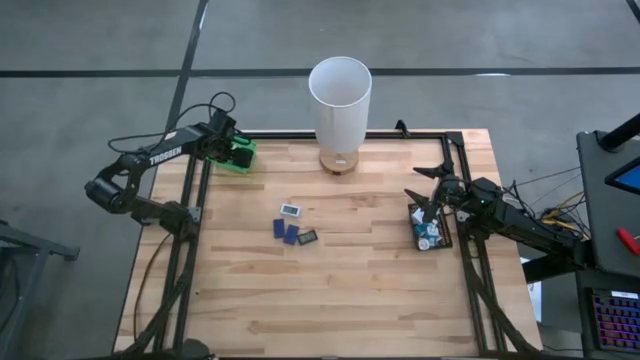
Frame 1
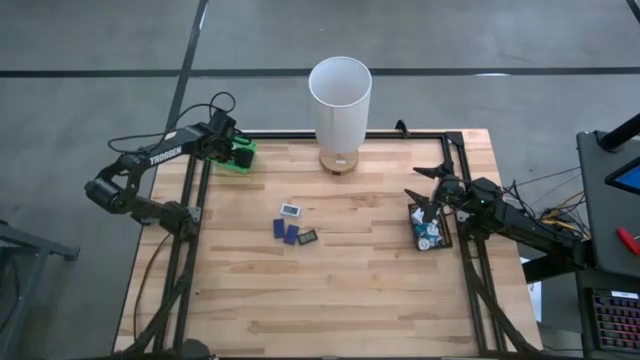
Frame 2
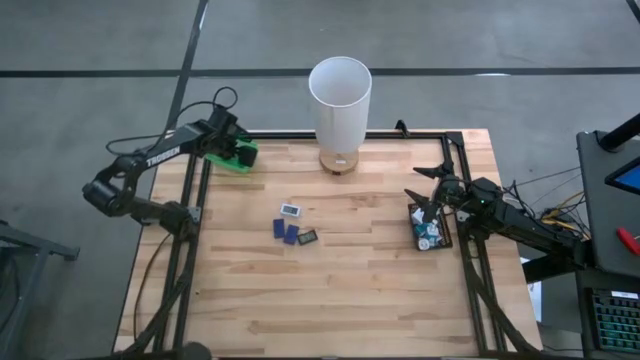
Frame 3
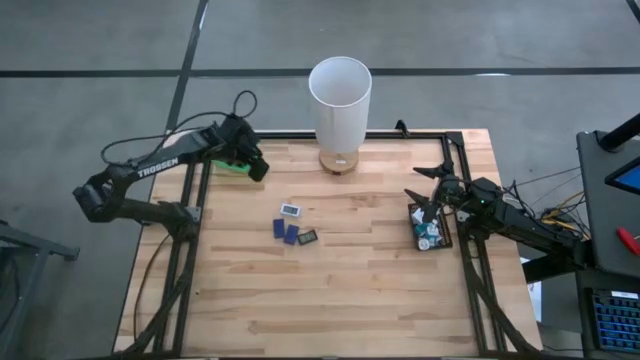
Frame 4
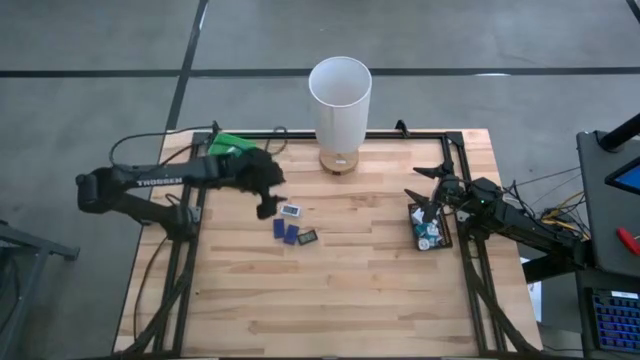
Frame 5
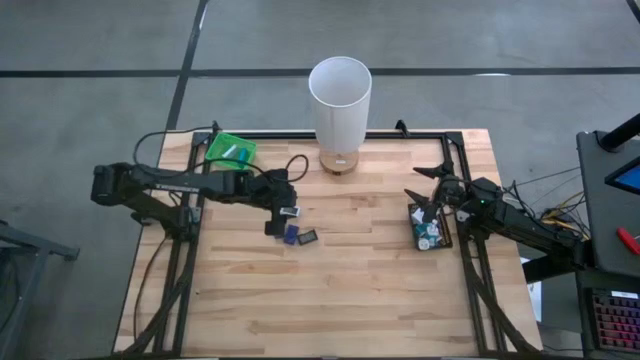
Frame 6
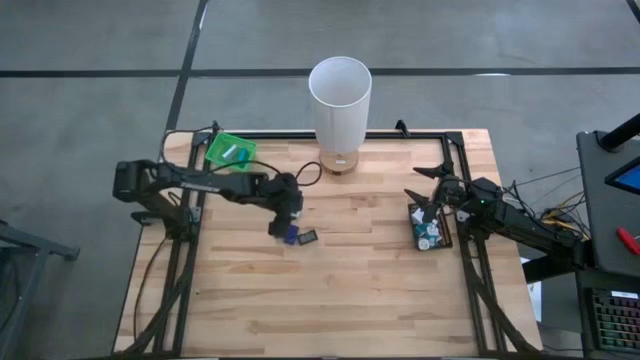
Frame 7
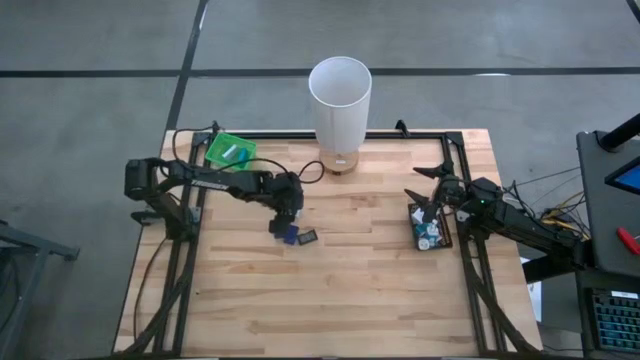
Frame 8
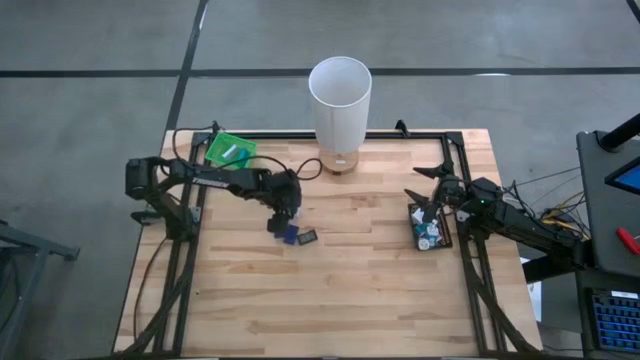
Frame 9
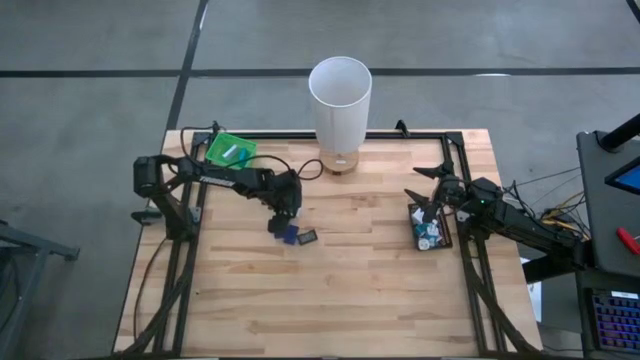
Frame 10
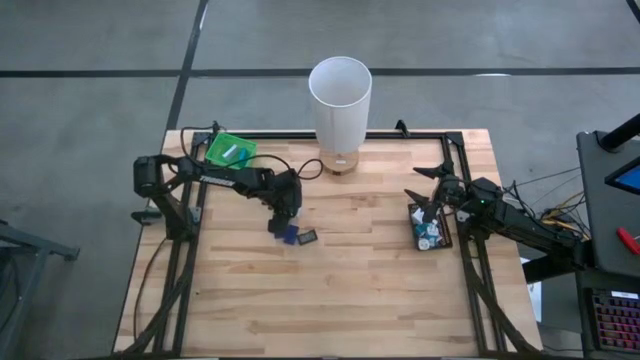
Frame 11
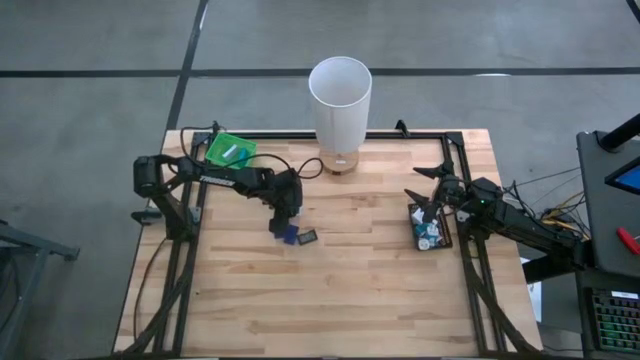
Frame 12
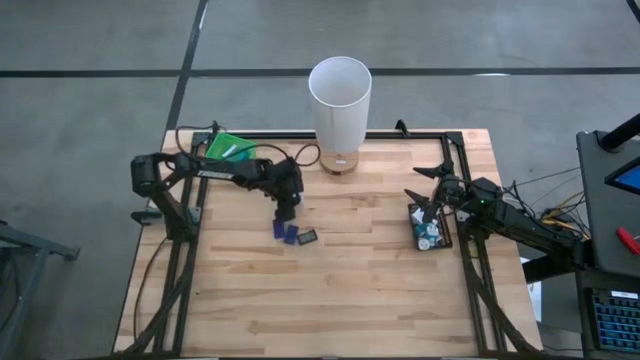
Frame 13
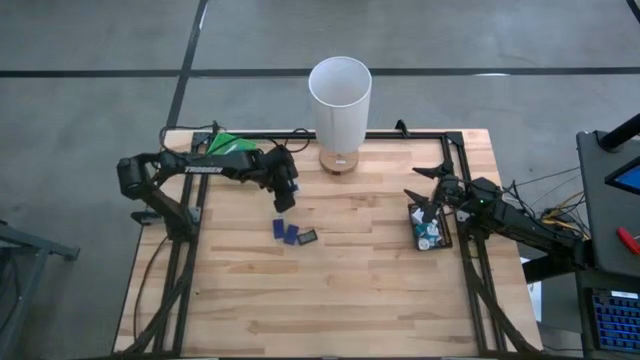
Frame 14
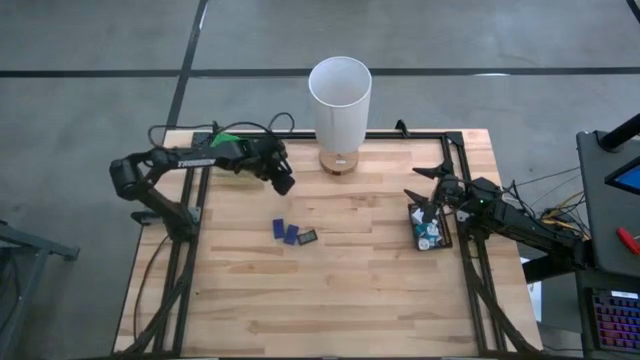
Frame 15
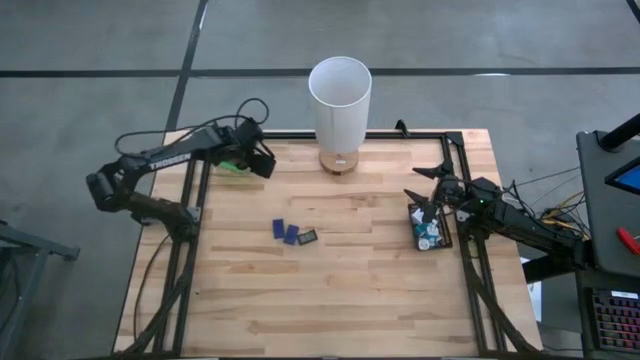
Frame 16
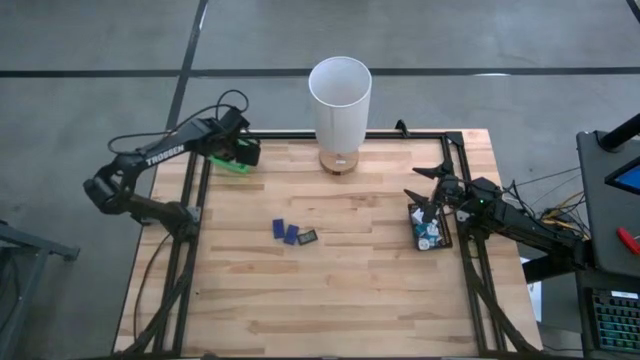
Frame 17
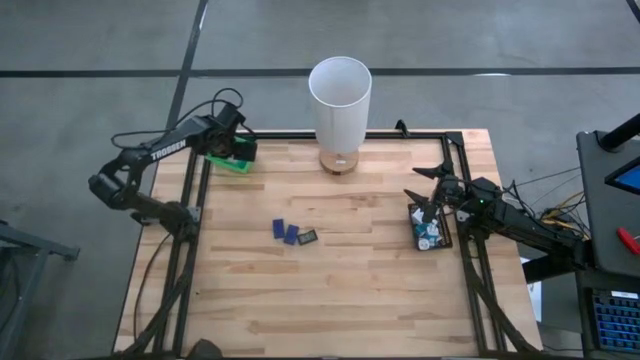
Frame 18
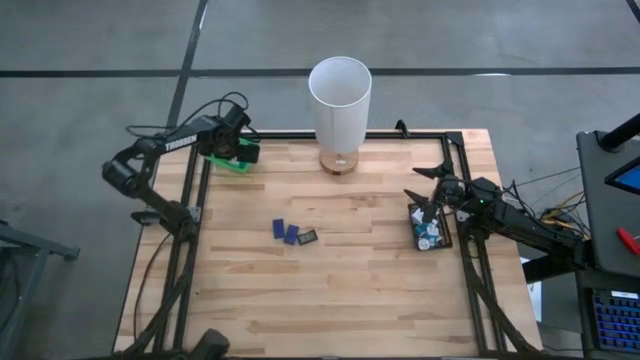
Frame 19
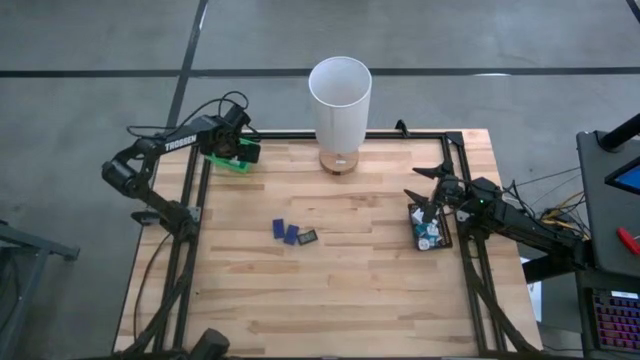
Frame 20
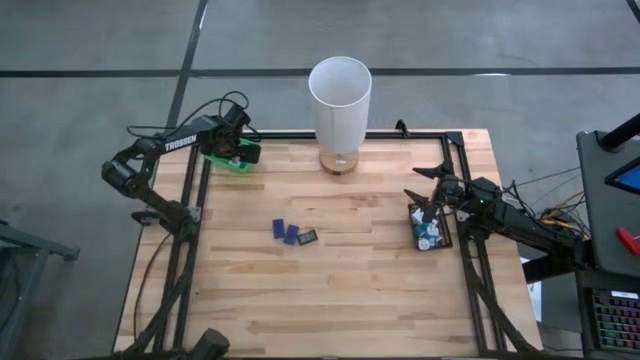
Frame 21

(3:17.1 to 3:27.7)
Task: Pick & Place Office items
Put the white digital clock into the green bin

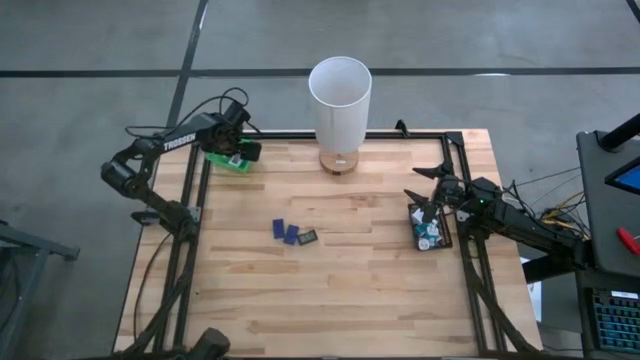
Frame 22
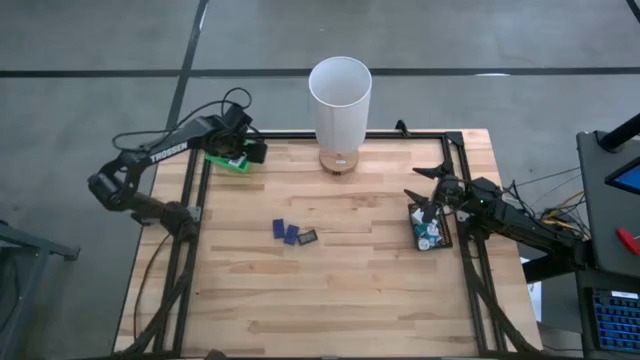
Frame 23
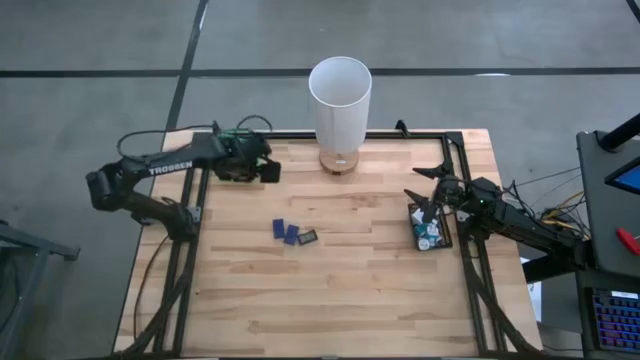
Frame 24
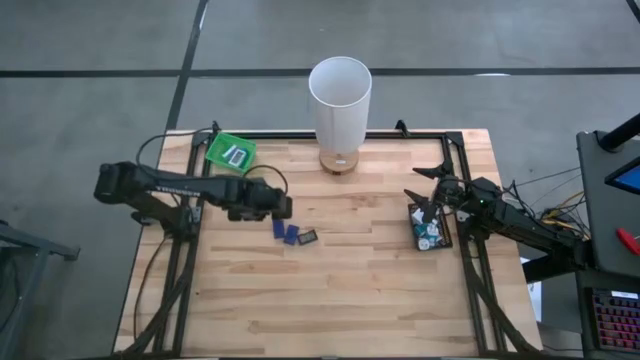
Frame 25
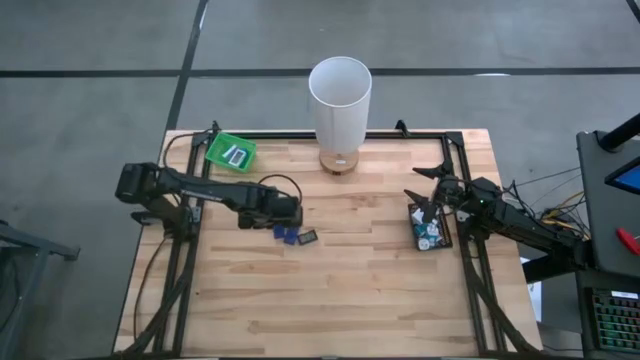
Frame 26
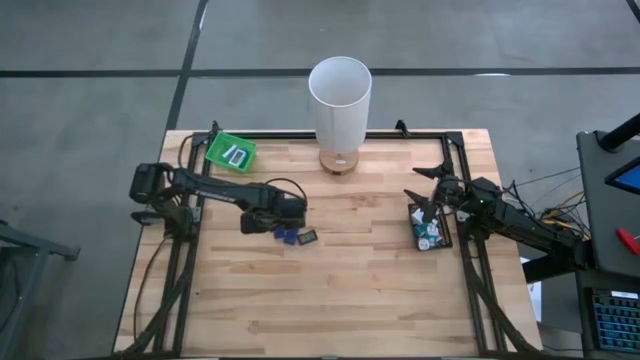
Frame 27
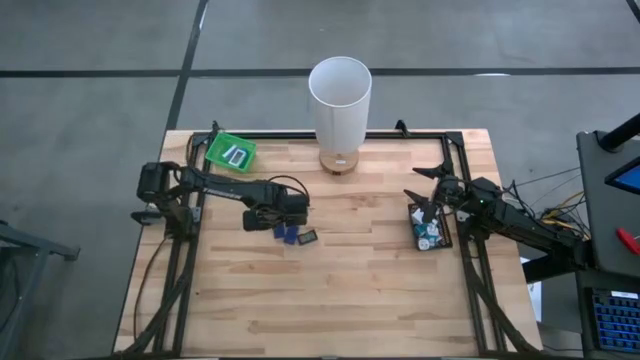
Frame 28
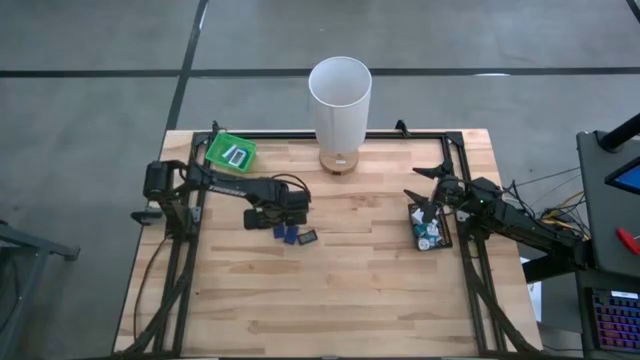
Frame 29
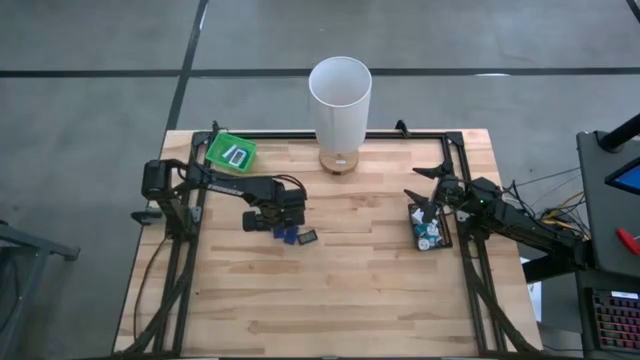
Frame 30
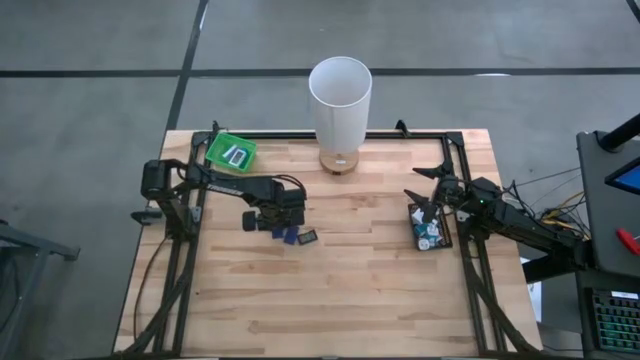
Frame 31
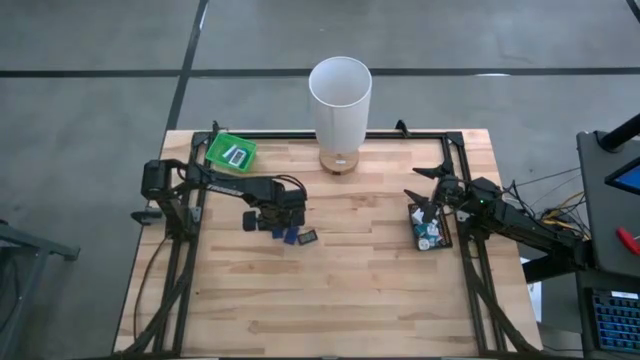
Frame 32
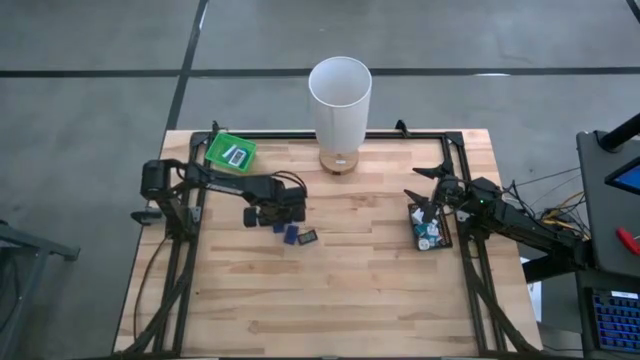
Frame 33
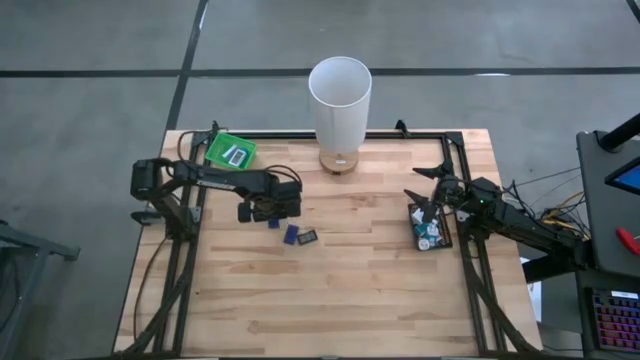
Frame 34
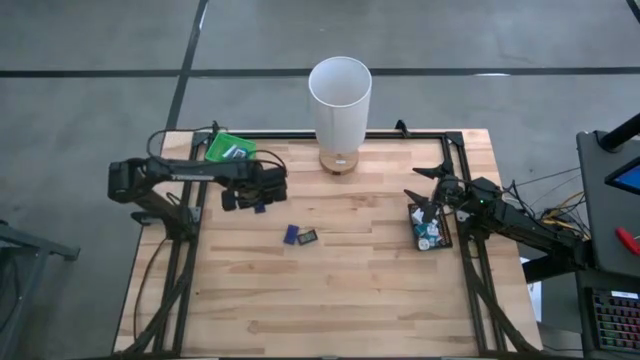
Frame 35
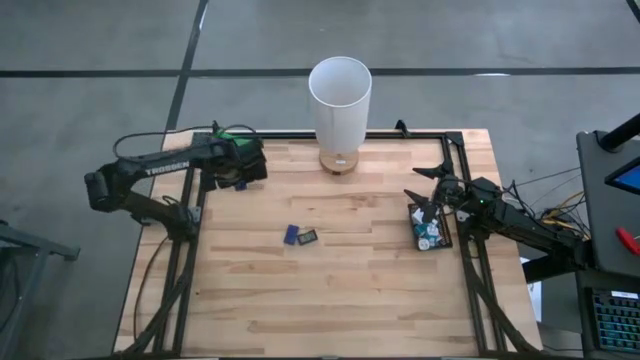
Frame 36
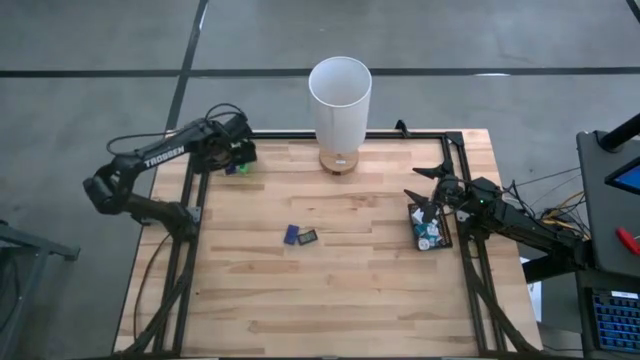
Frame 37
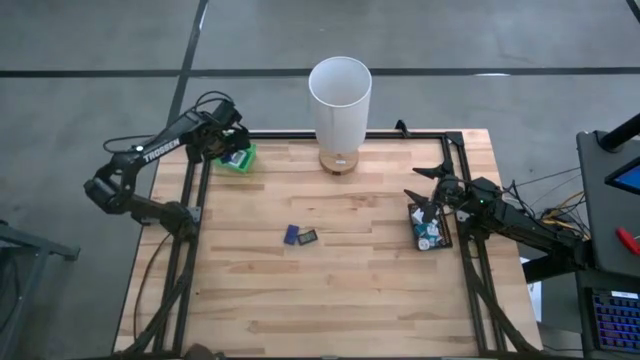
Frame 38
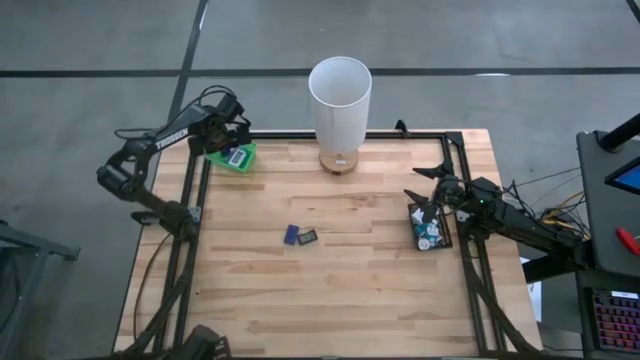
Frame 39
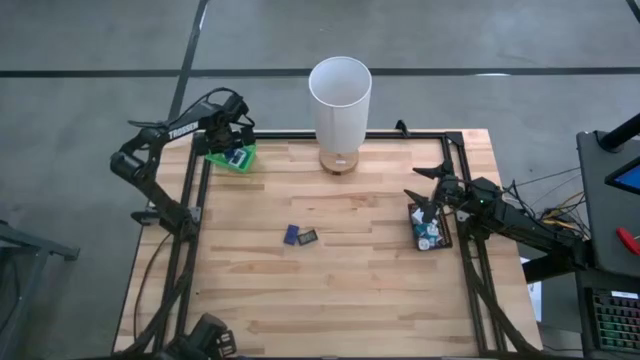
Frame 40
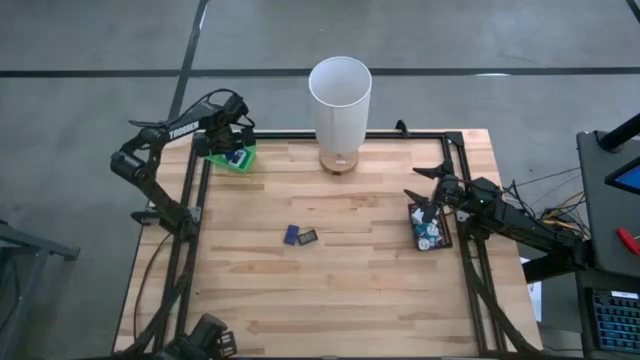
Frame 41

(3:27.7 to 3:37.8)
Put the left blue digital clock into the green bin

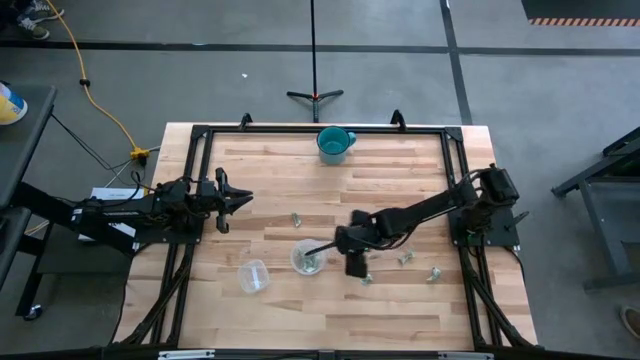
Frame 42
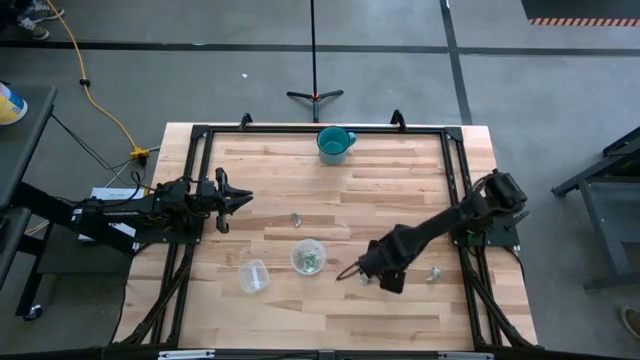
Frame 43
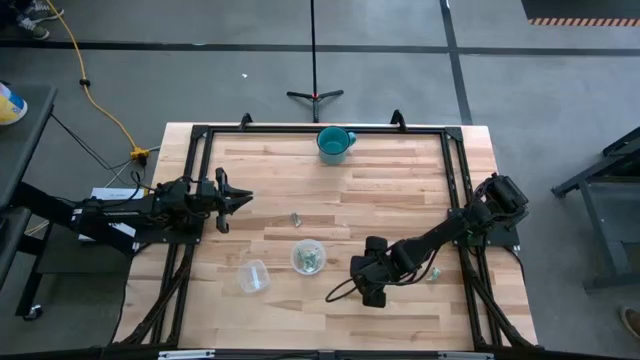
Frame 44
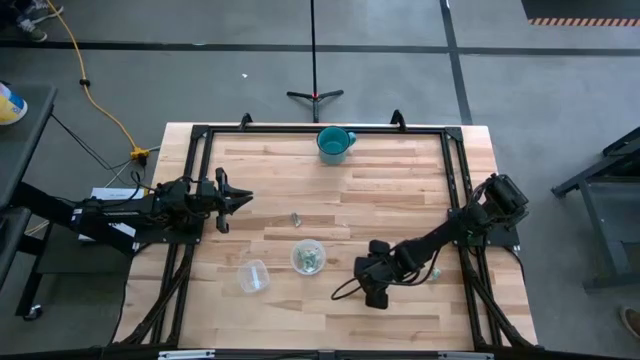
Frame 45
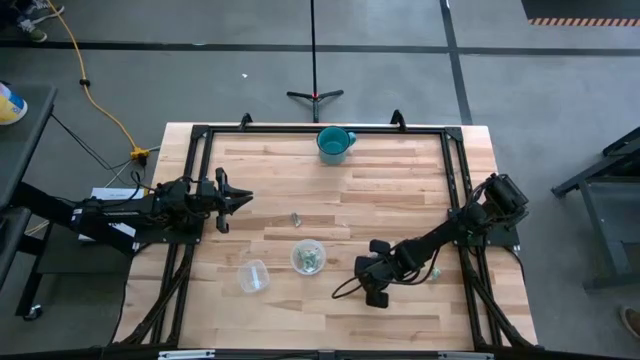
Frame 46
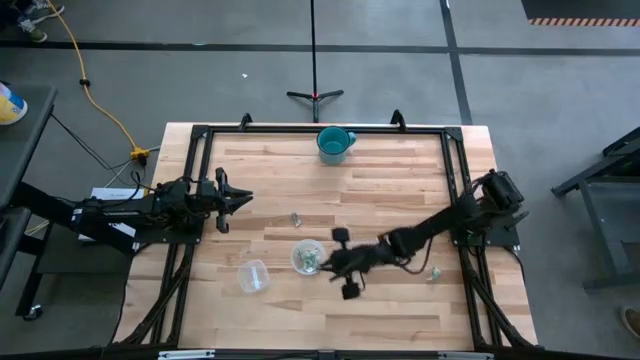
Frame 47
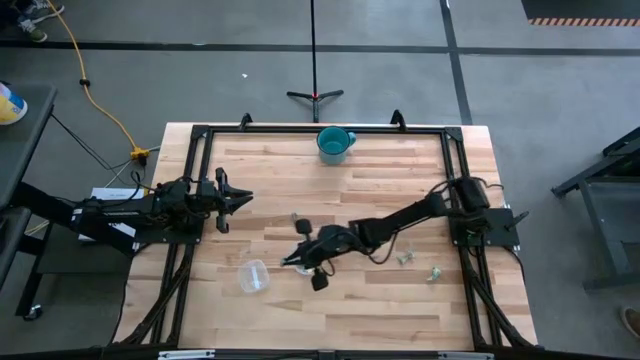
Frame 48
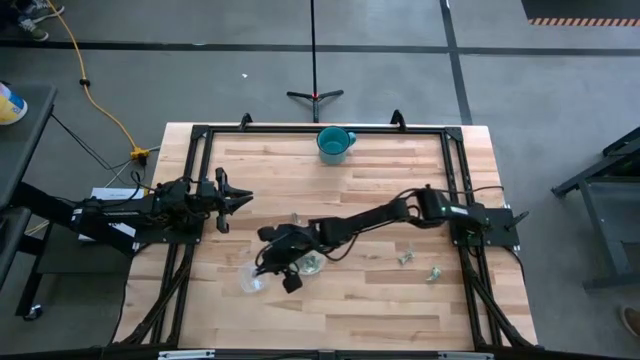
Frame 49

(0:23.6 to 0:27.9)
Task: Pick and place items into bin
Put the stevia packet into the left transparent bin
